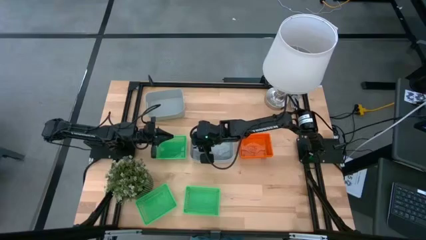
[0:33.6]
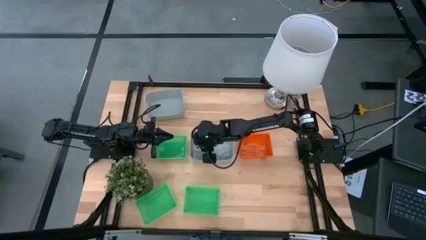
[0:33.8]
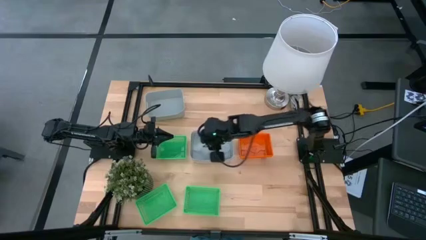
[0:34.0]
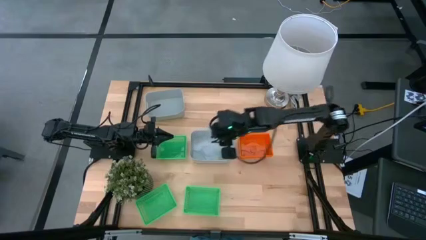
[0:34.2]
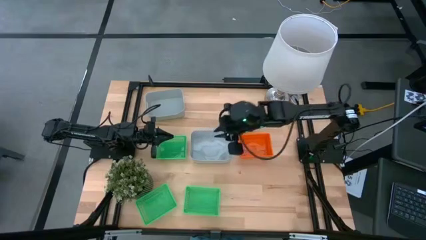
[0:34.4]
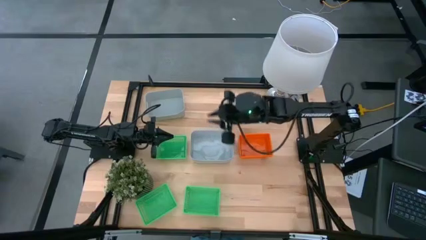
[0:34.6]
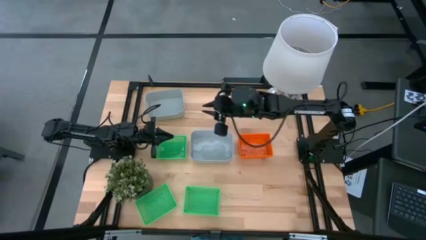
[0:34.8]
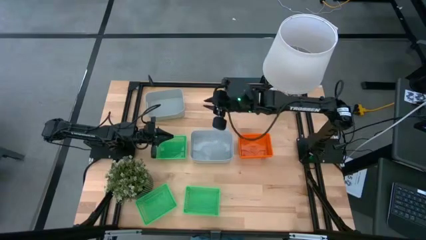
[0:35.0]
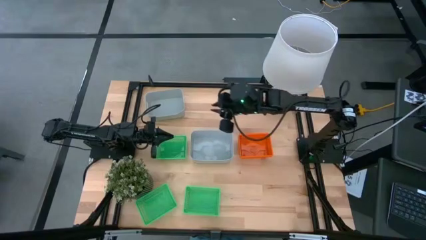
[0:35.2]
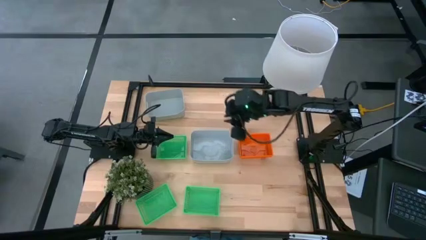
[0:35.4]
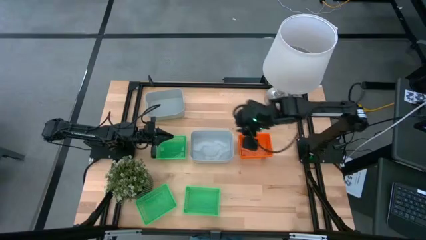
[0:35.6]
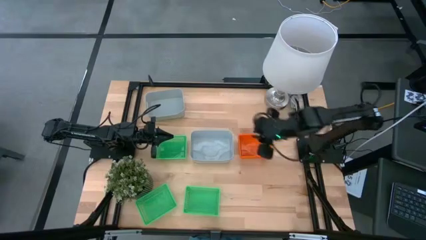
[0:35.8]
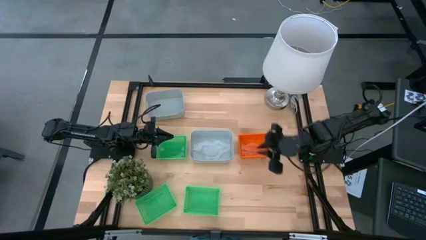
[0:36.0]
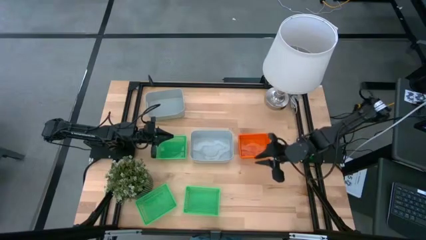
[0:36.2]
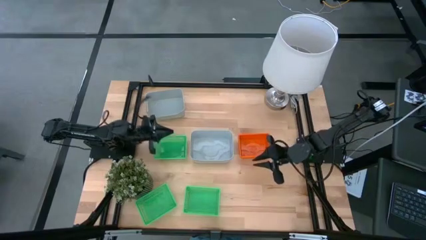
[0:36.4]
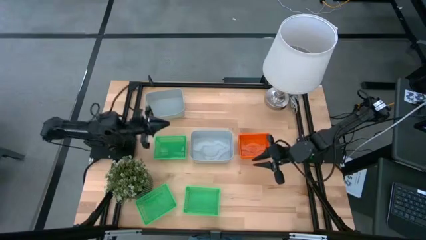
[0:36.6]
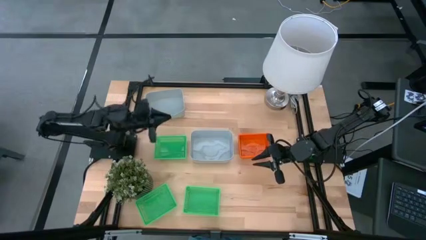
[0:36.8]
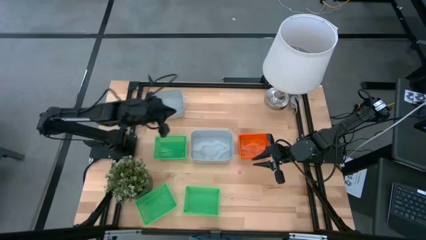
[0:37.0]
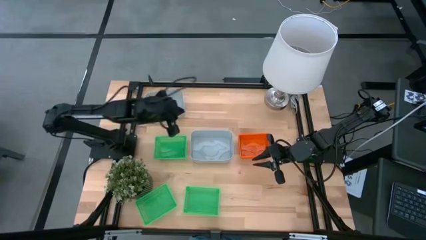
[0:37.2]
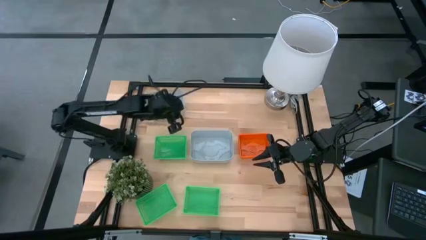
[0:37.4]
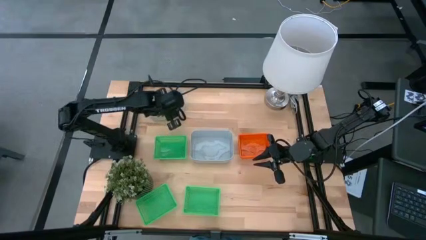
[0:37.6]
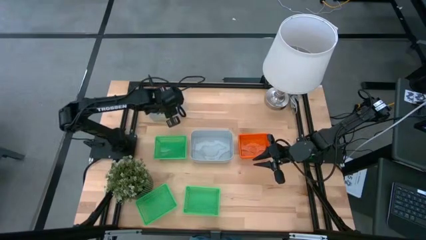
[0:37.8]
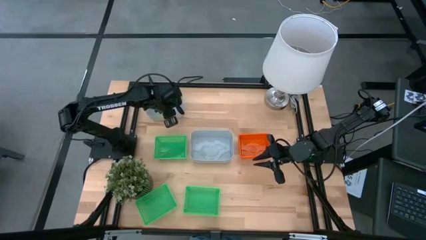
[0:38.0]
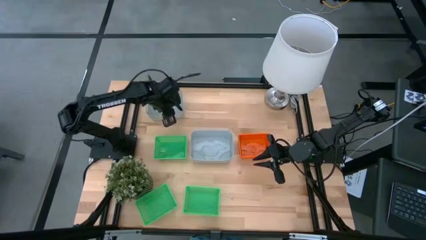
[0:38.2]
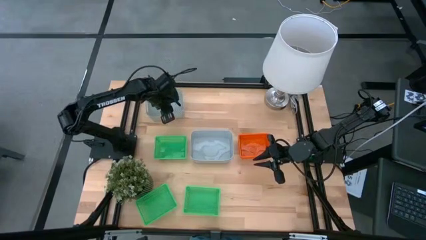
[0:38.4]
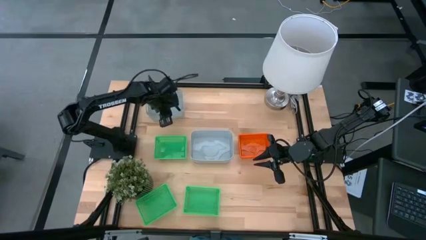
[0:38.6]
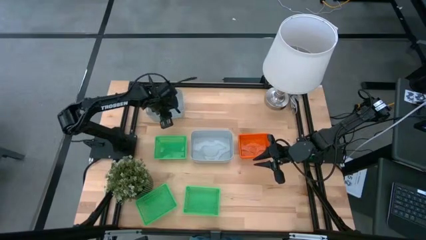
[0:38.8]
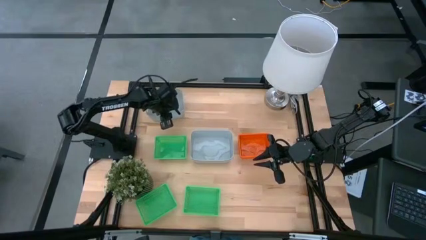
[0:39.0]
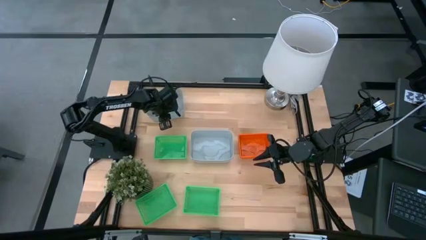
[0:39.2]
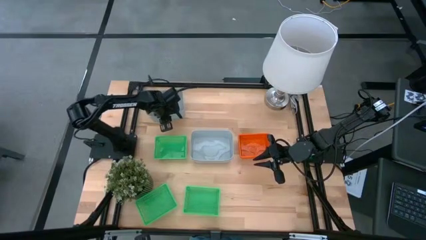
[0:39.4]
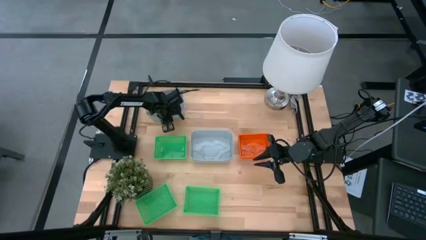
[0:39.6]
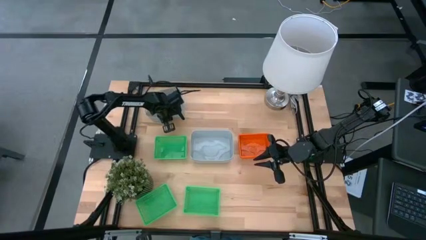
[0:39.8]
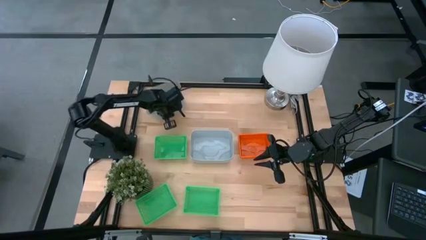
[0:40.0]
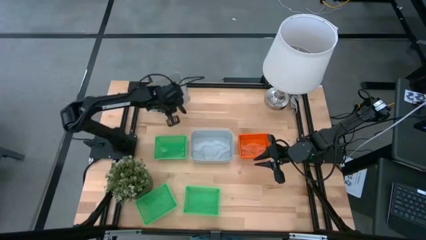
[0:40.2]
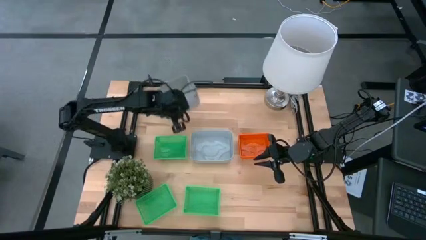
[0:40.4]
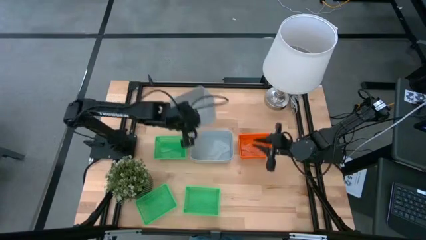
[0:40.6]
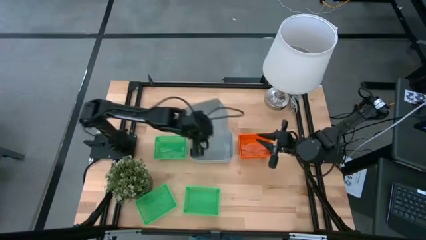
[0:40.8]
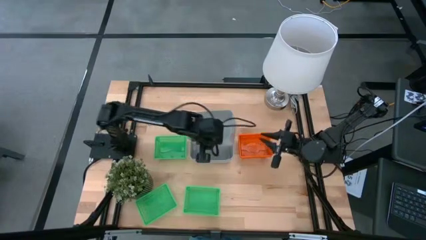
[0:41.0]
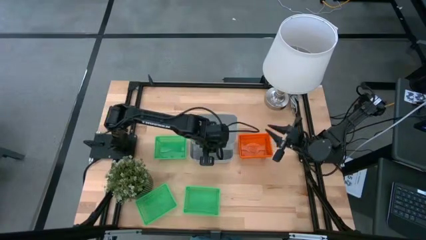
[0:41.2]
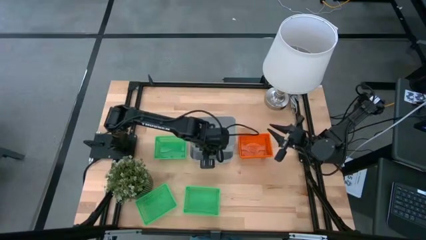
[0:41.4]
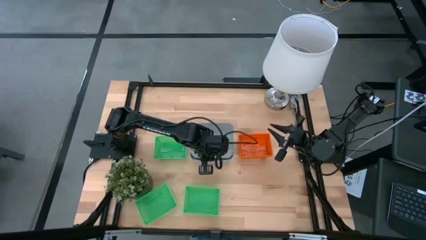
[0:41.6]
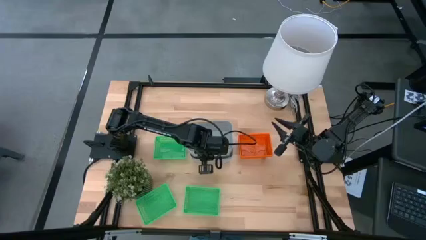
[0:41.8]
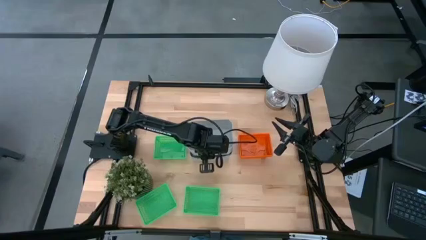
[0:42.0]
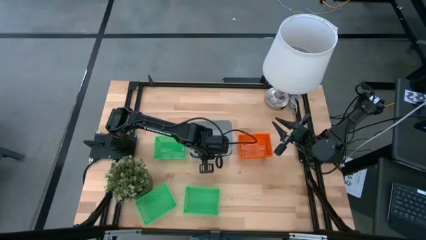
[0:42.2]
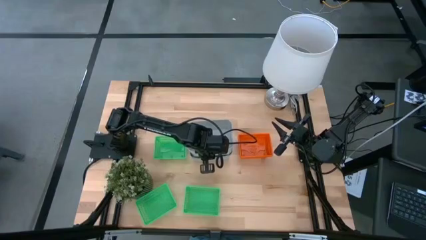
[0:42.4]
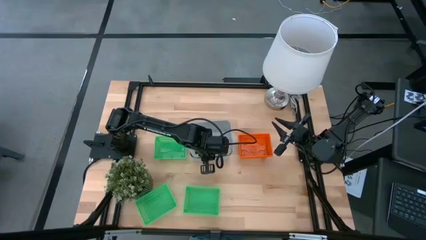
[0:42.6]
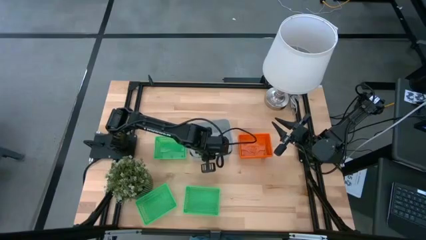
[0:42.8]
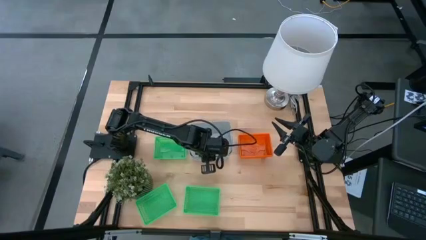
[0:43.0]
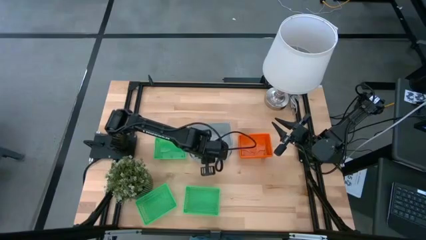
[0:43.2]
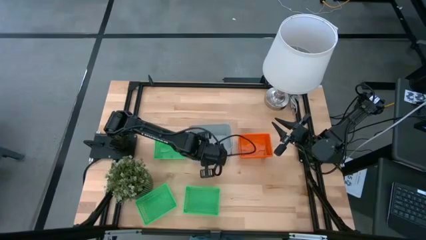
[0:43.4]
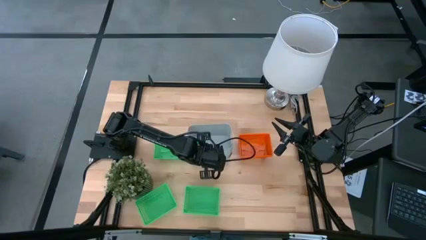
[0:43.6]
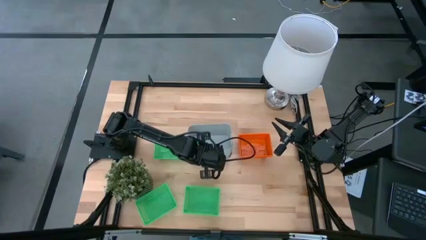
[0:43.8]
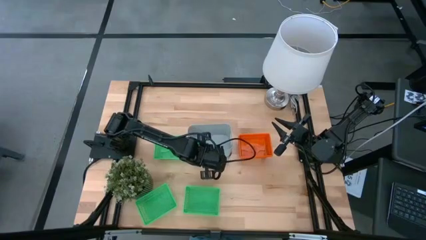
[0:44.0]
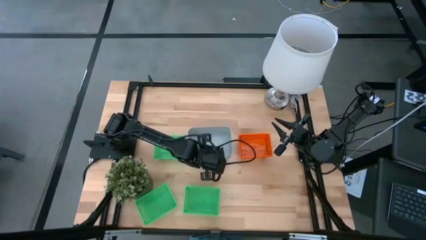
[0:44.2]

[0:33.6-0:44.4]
Stack the top gray bin on top of the bottom gray bin

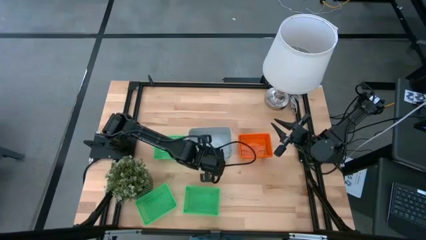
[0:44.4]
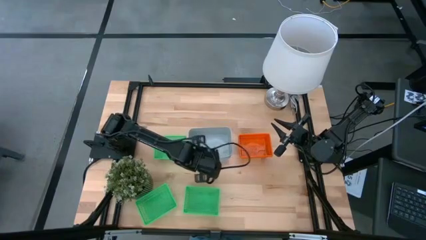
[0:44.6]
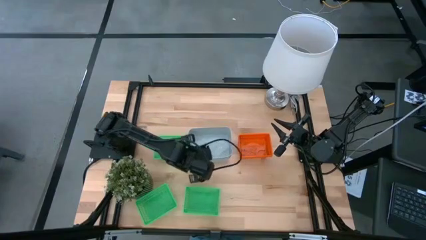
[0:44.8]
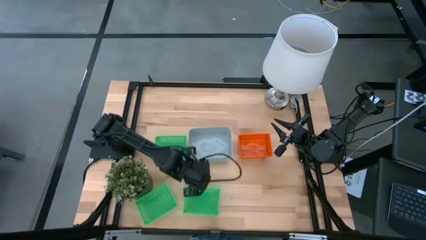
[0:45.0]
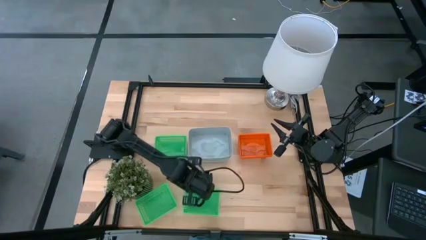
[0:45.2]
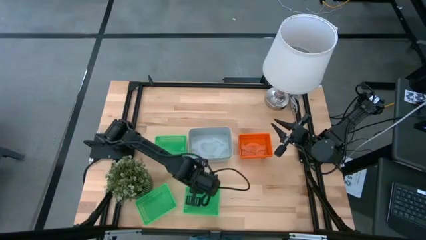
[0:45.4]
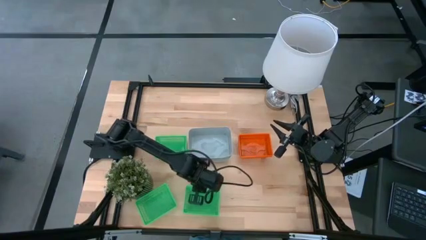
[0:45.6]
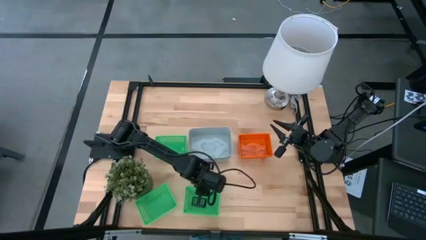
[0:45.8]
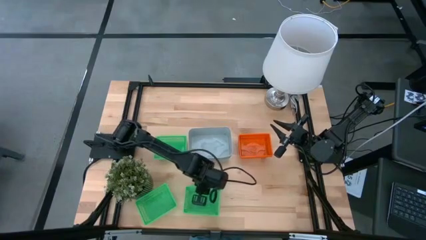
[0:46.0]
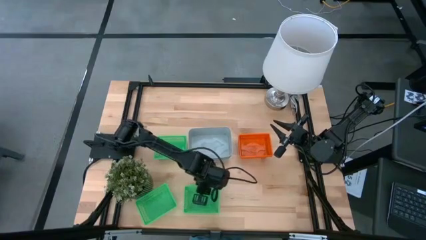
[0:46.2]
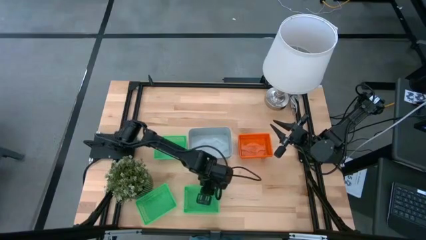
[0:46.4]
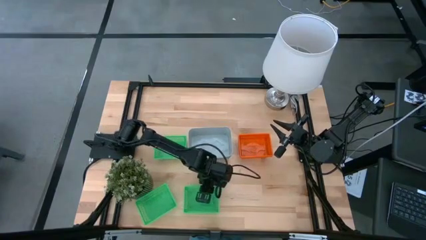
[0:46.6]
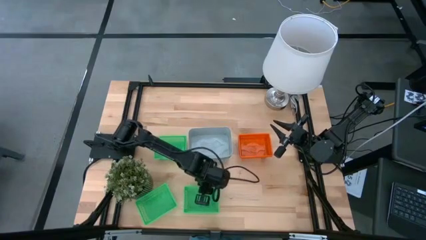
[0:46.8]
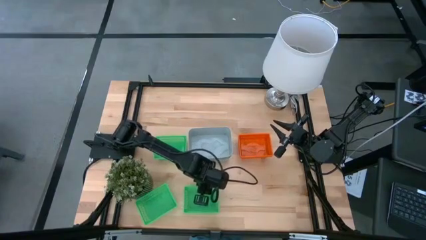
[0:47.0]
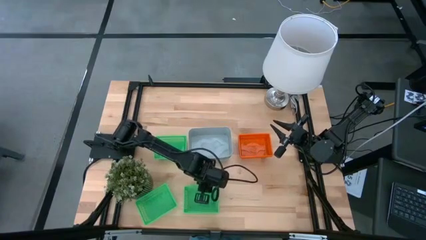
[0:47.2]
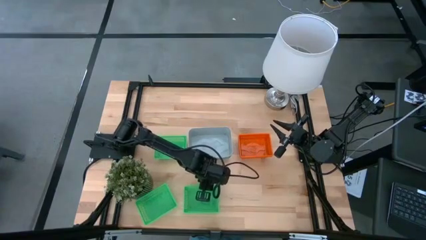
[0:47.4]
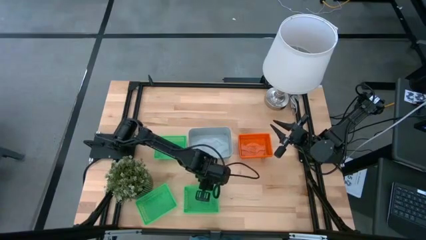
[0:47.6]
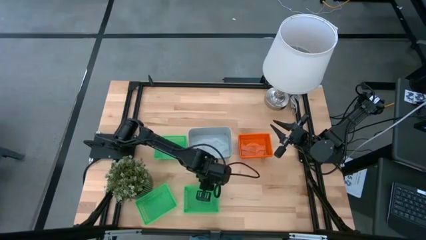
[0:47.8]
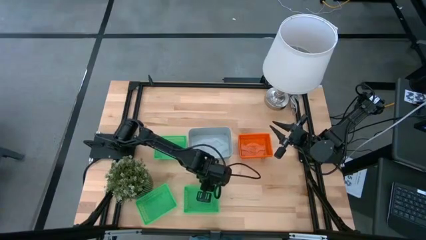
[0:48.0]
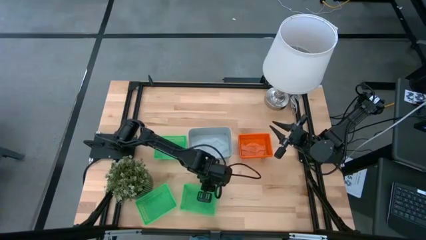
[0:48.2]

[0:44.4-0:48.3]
Stack the bottom right green bin on top of the top green bin
